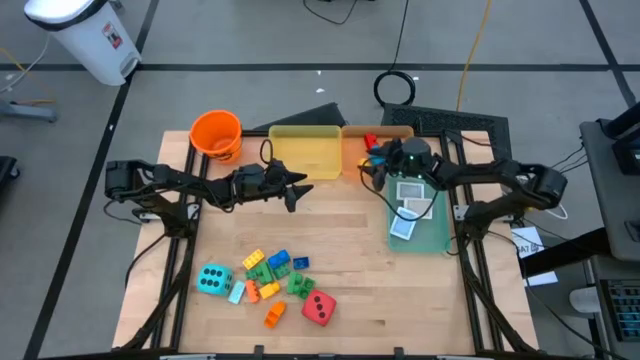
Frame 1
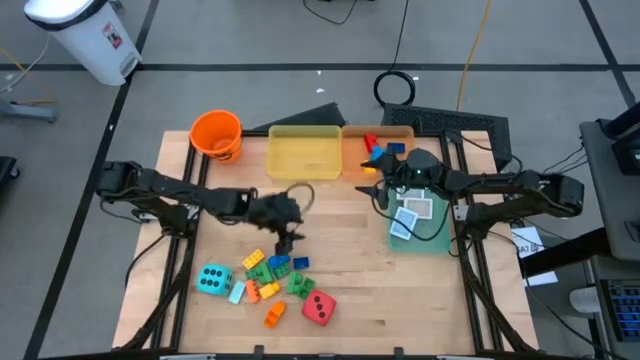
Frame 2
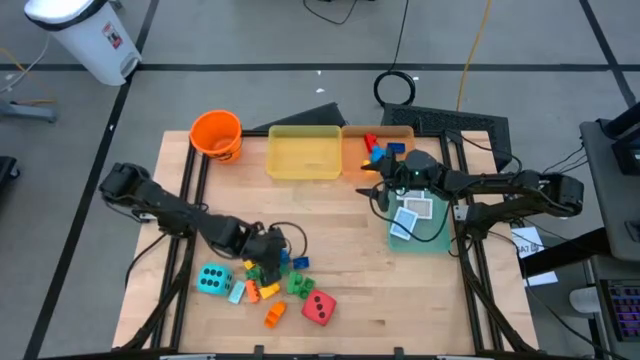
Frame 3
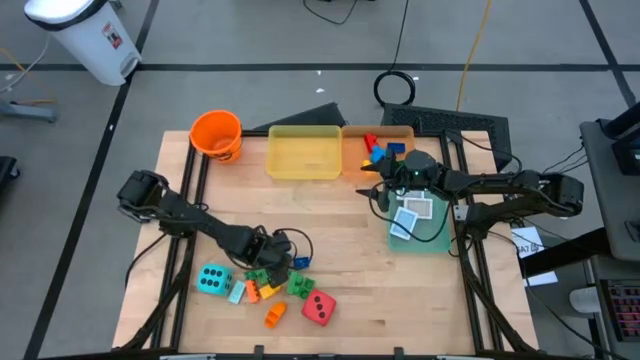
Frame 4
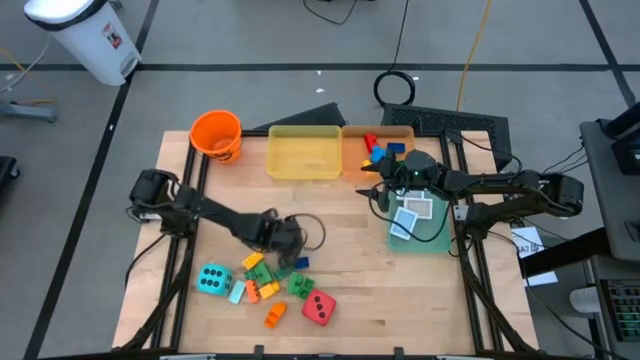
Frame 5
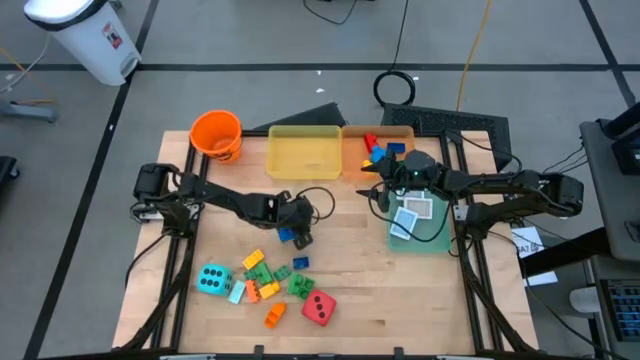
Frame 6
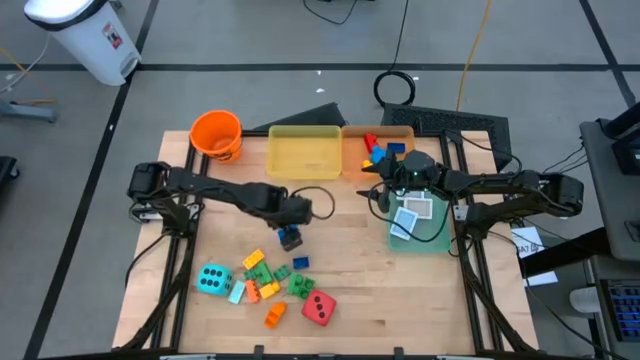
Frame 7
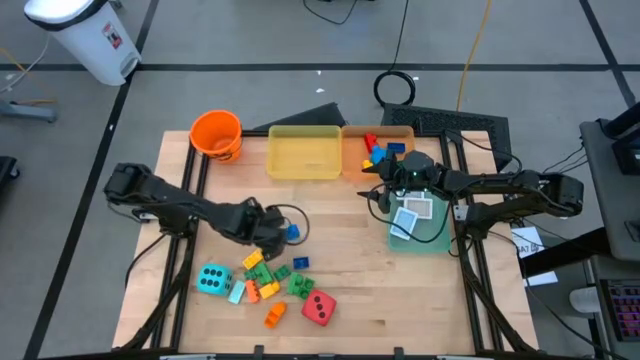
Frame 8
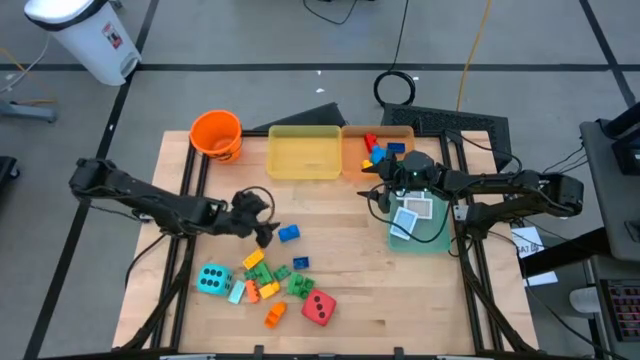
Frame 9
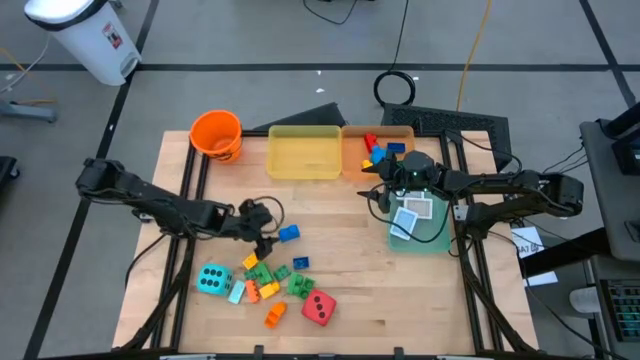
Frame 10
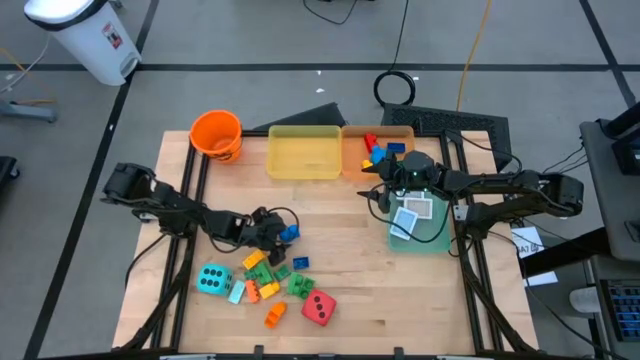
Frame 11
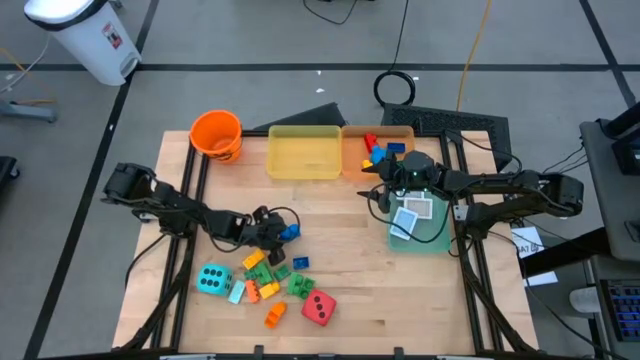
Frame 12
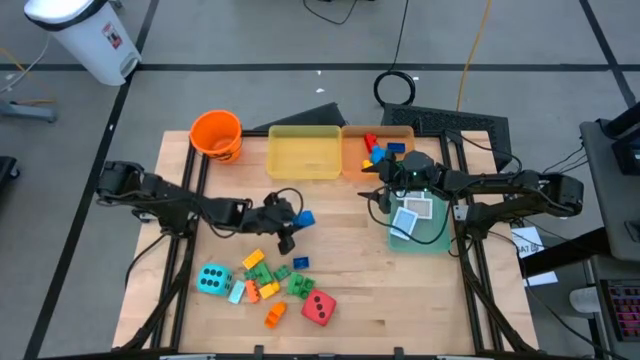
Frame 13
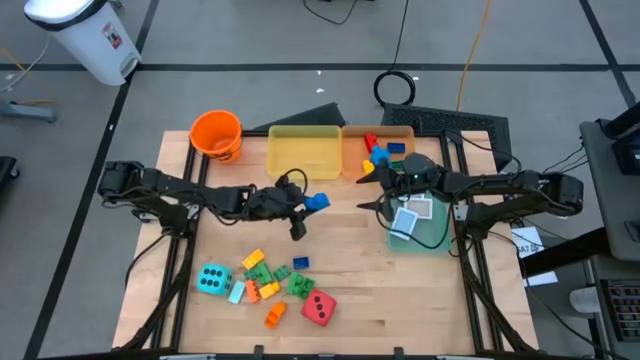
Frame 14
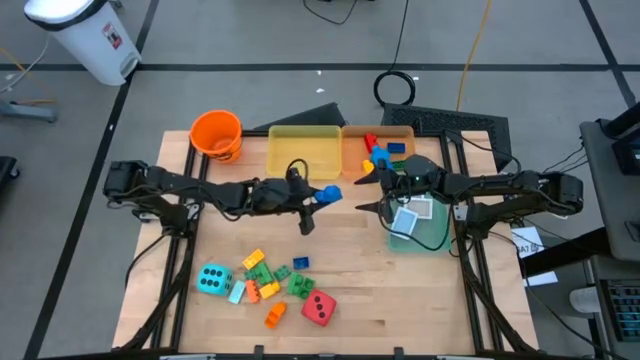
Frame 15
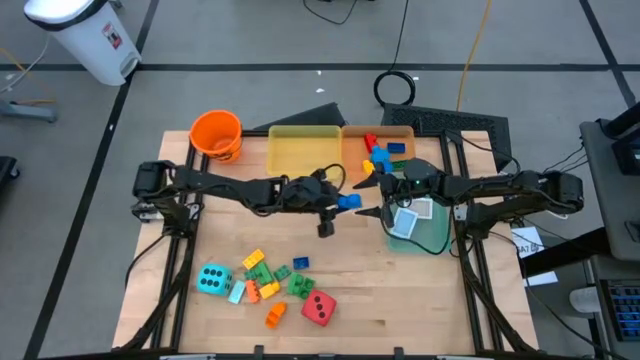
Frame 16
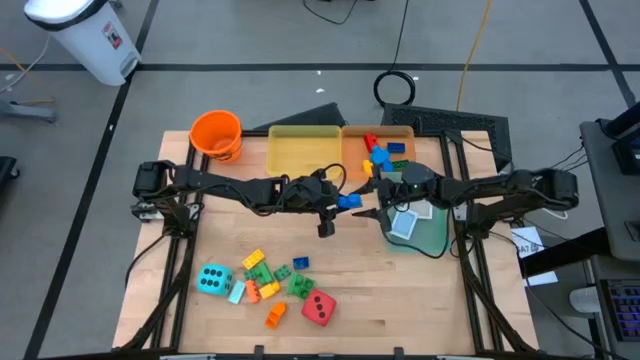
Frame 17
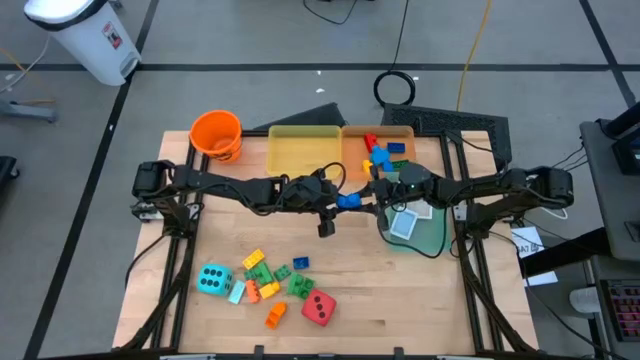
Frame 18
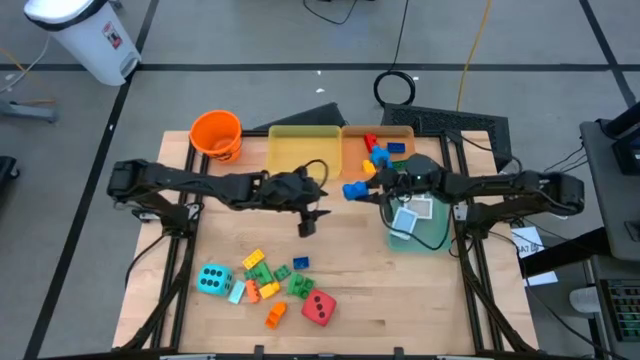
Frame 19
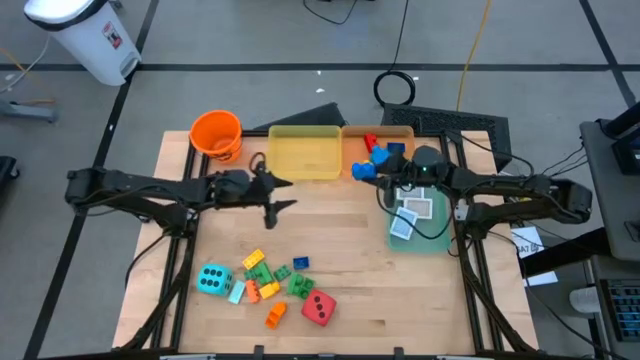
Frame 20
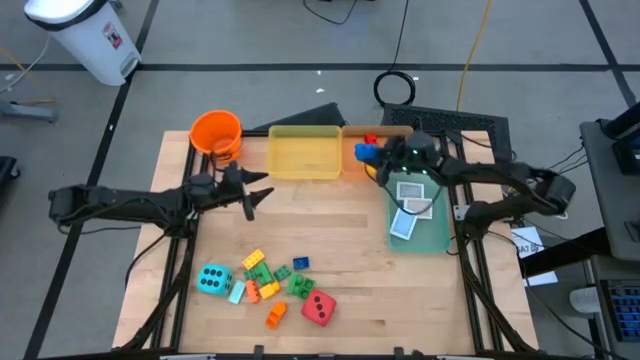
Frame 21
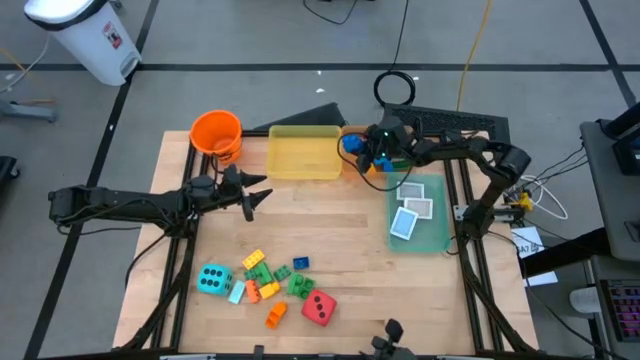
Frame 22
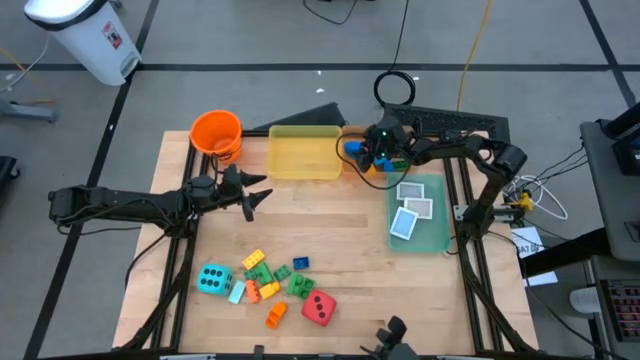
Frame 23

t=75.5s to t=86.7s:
Task: Pick & Place Toys
Put the blue game piece into the orange bin

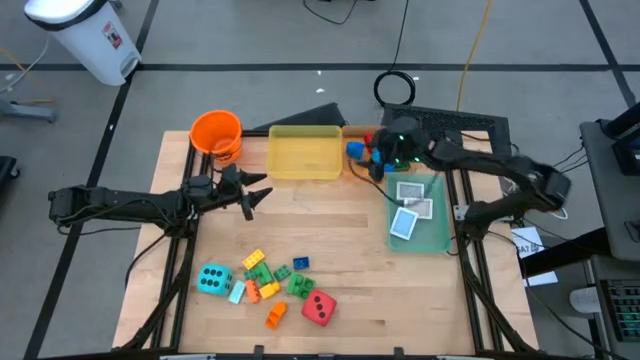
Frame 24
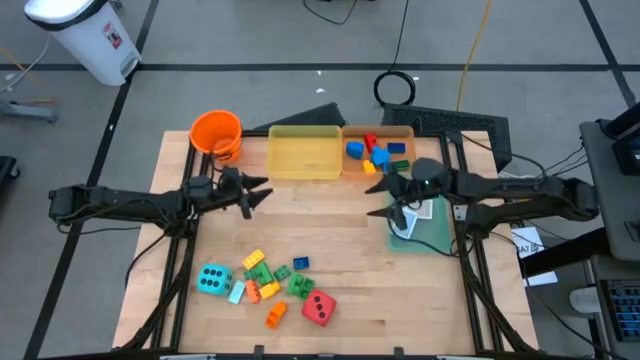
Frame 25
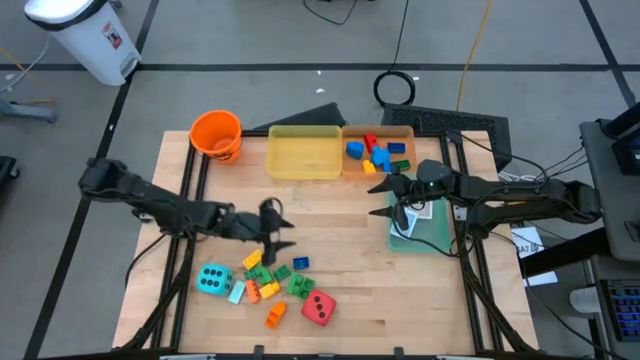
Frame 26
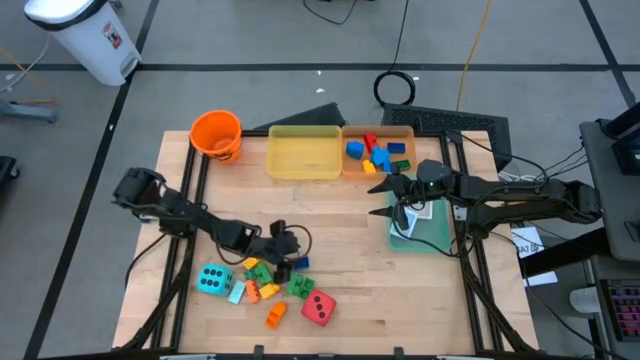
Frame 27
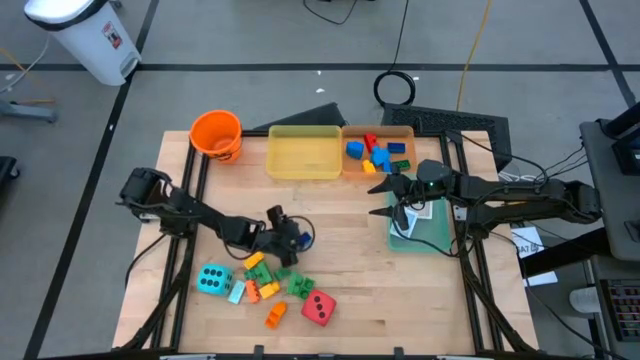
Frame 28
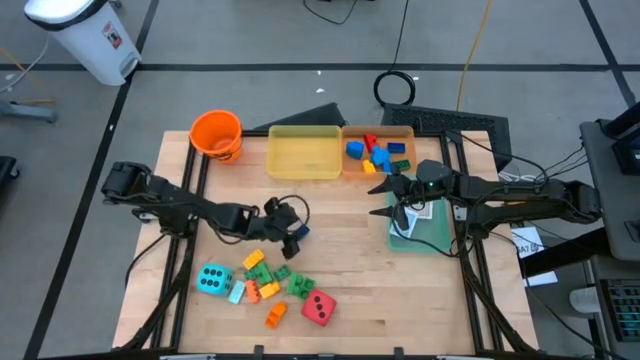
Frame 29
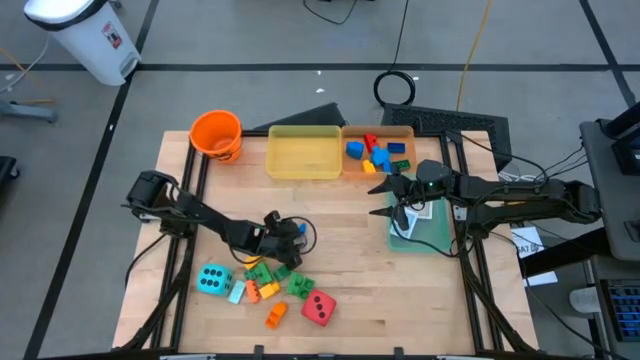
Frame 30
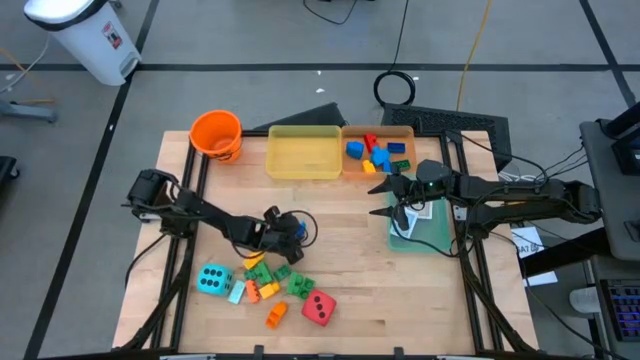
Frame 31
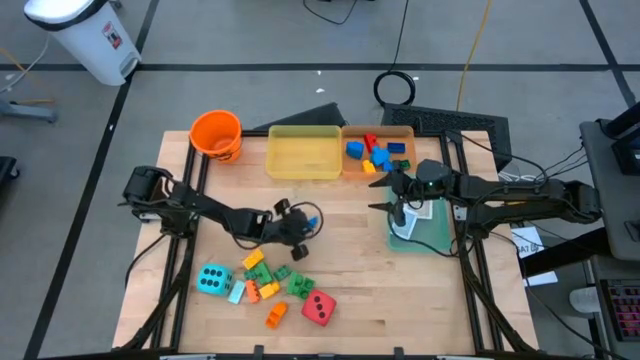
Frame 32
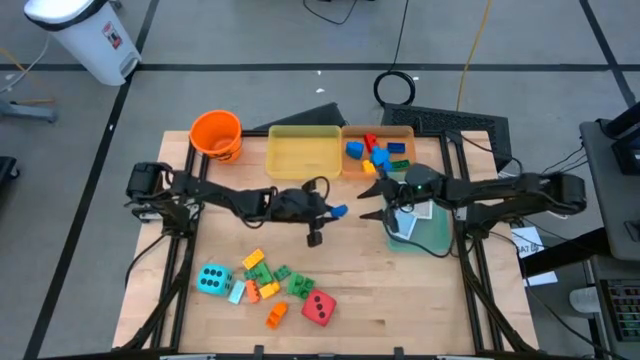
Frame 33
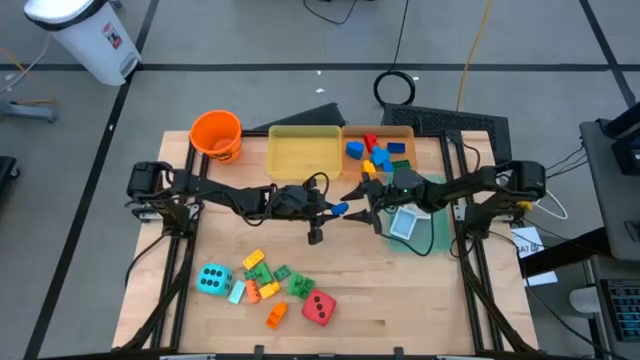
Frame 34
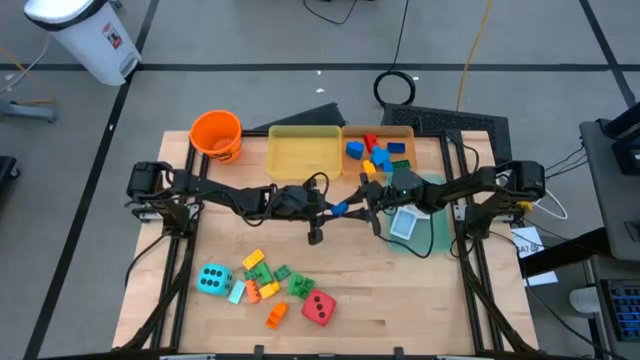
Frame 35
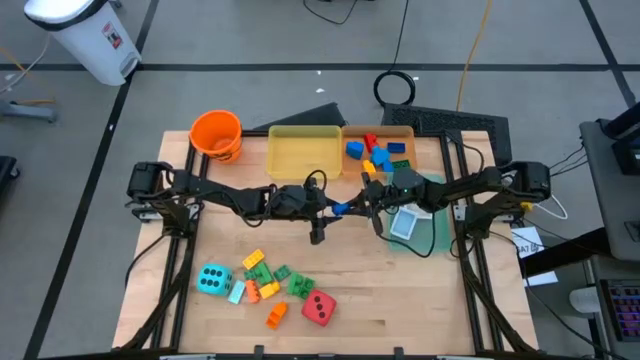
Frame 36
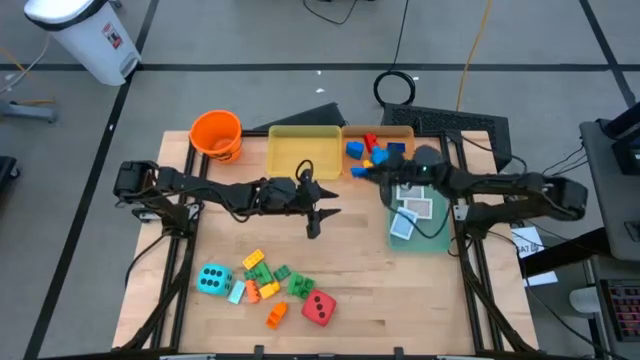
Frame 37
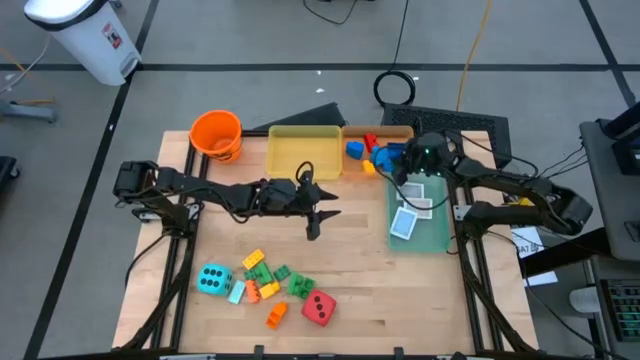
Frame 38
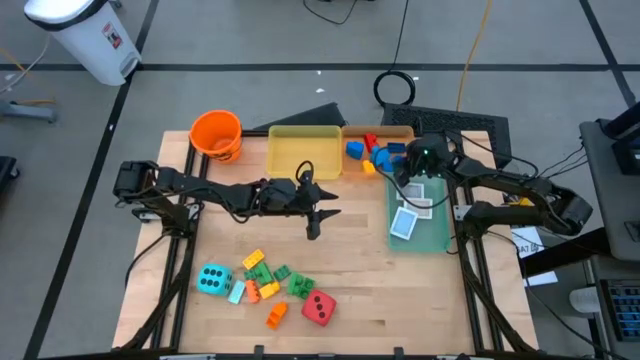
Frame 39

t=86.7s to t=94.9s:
Put the dark blue game piece into the orange bin

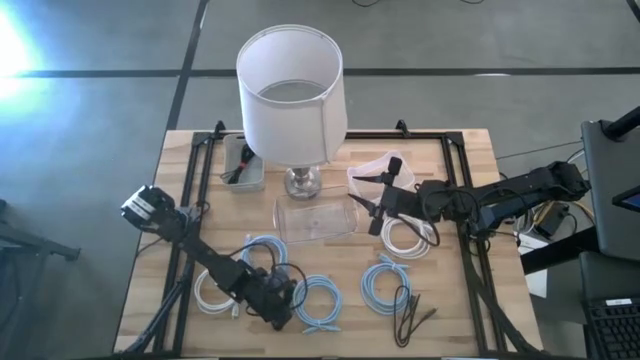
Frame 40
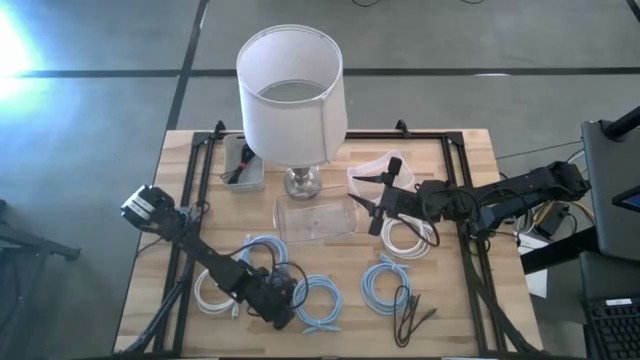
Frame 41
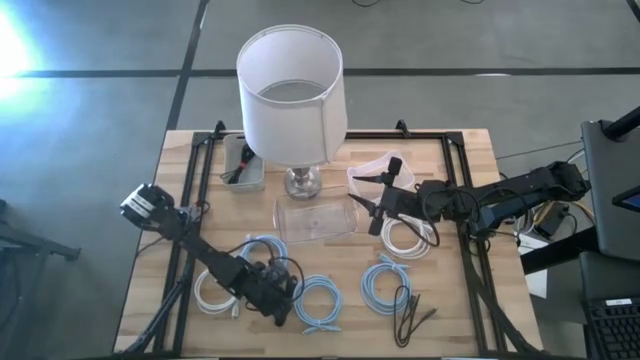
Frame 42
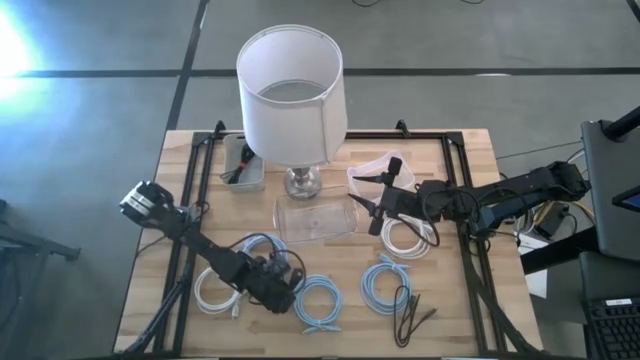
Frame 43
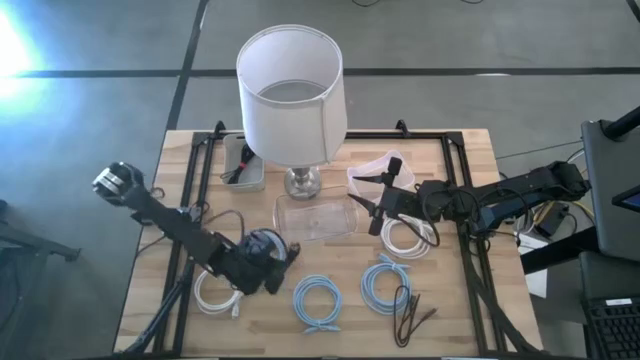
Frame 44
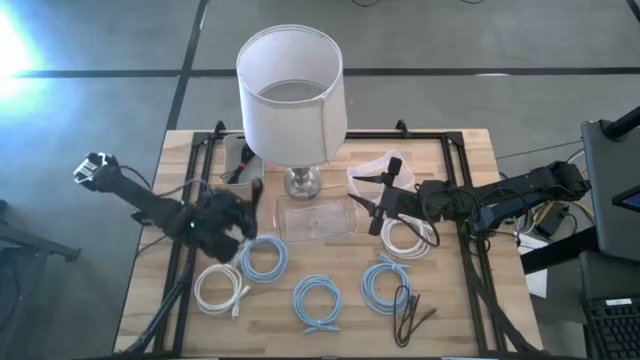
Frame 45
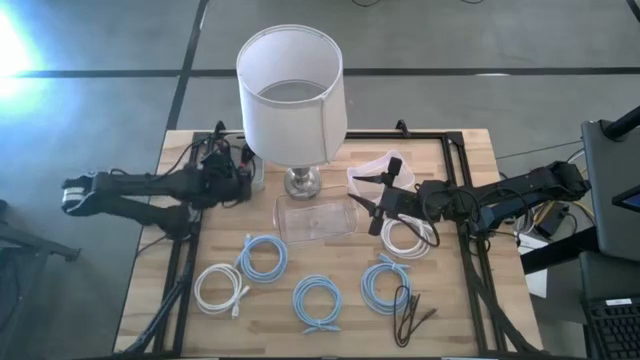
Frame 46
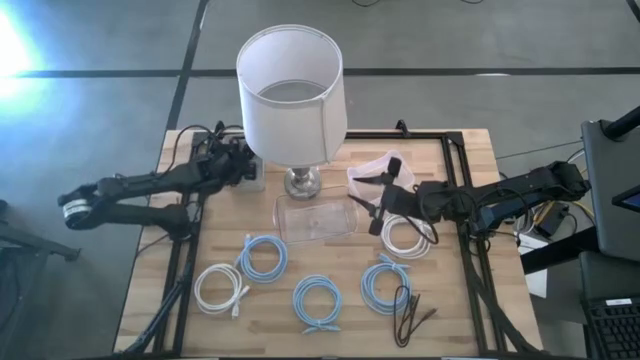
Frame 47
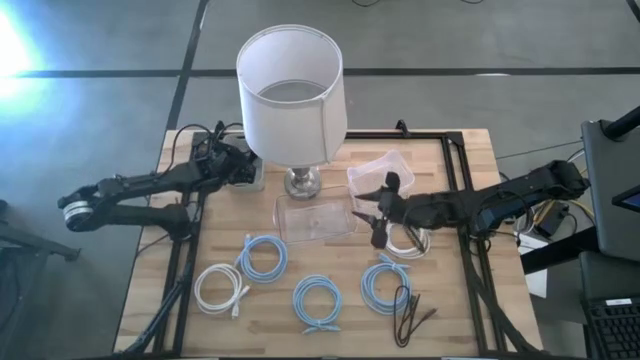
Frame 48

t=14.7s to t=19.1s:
Task: Pick & Place USB Port
Put the left black usb cable into the gray bin
